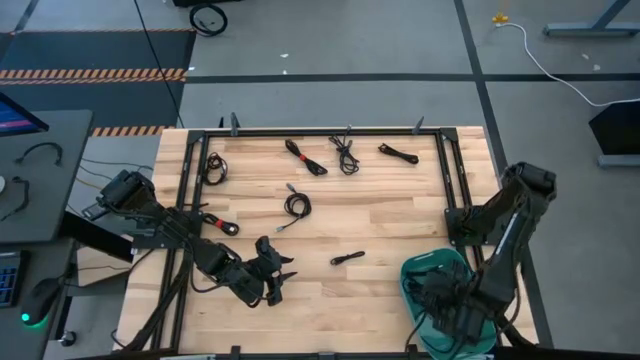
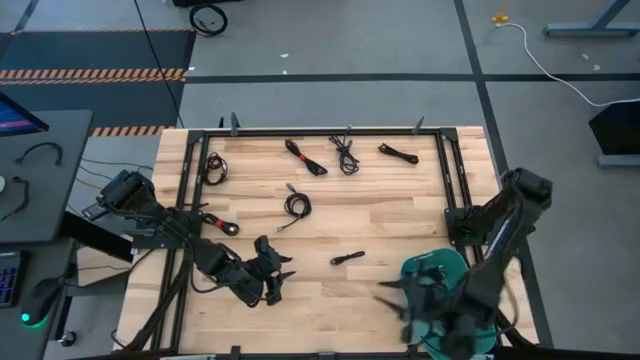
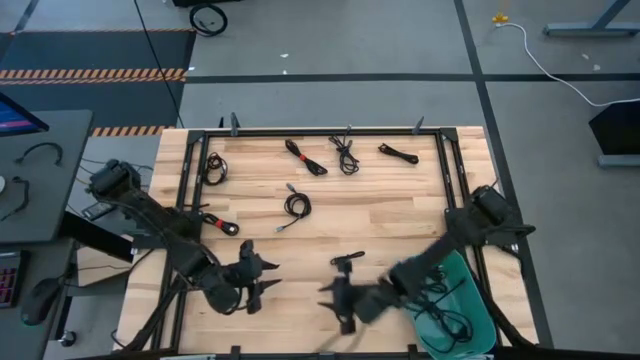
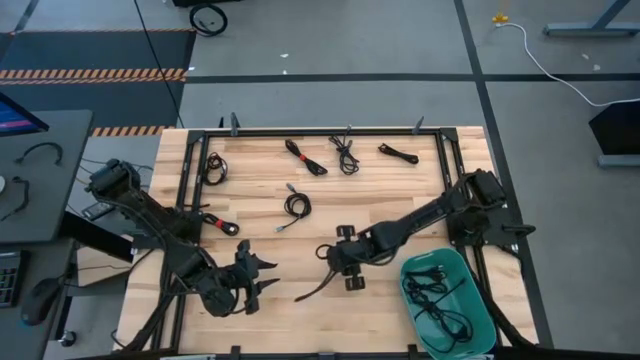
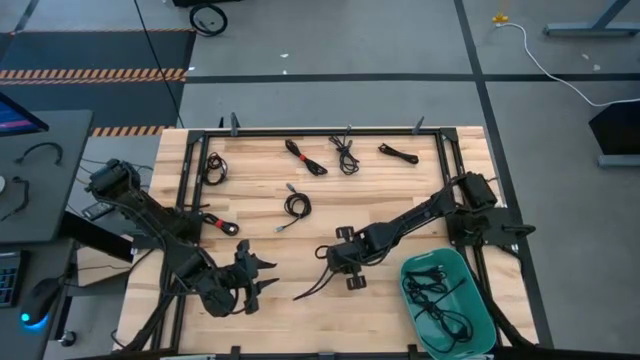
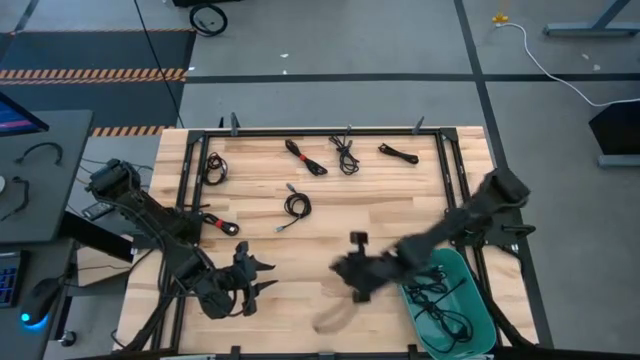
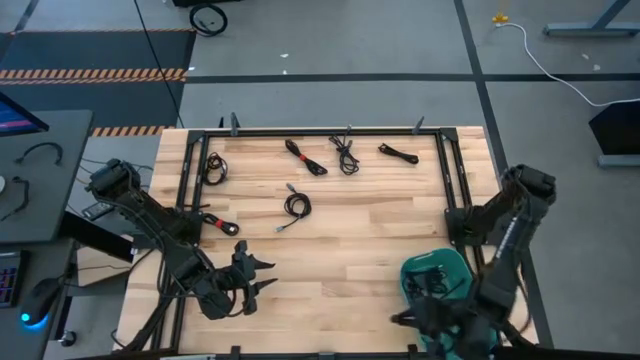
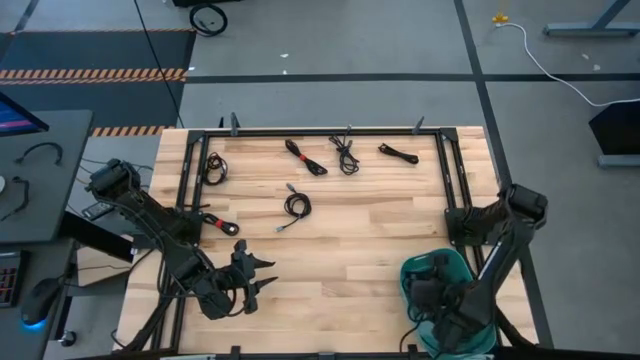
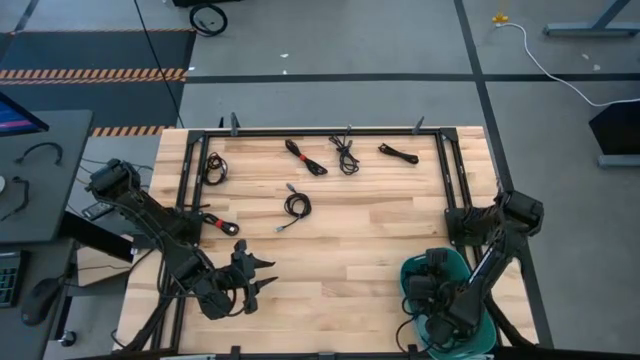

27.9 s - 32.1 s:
Task: Pick and place USB-C Cables
Put the black charger cable into the blue bin

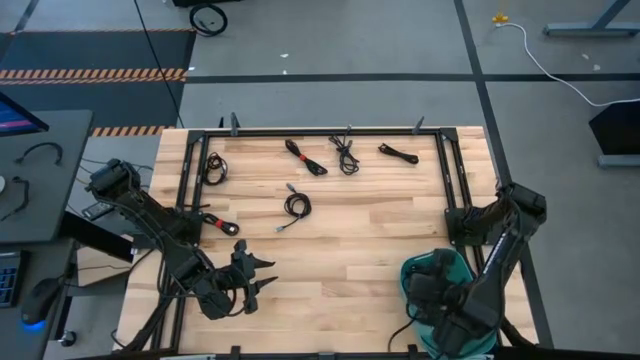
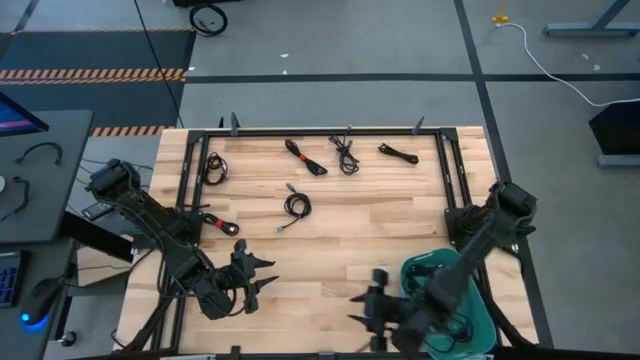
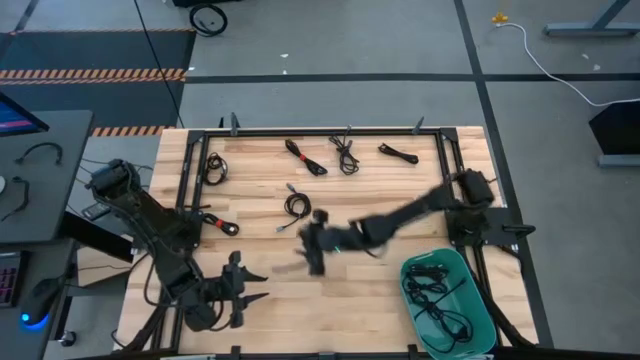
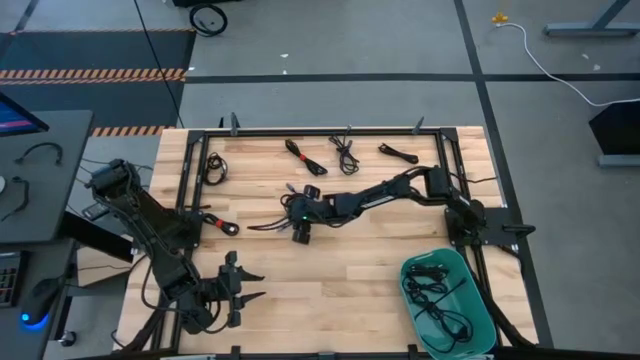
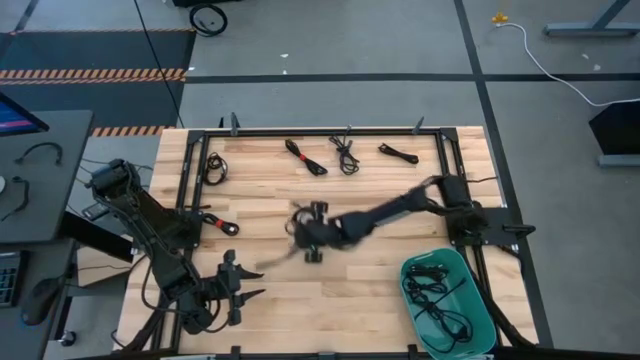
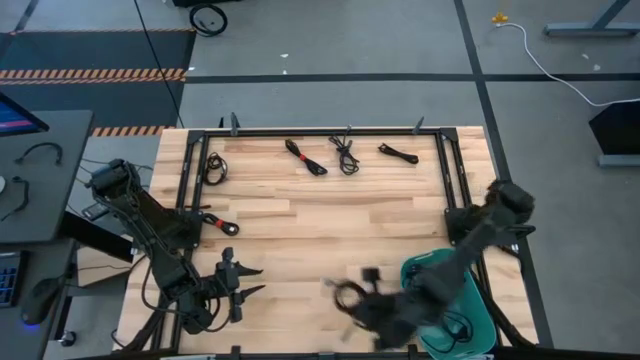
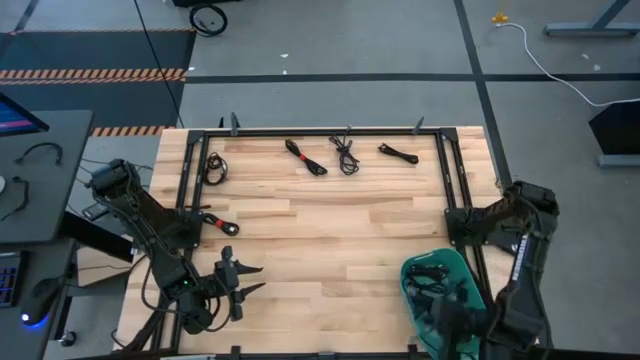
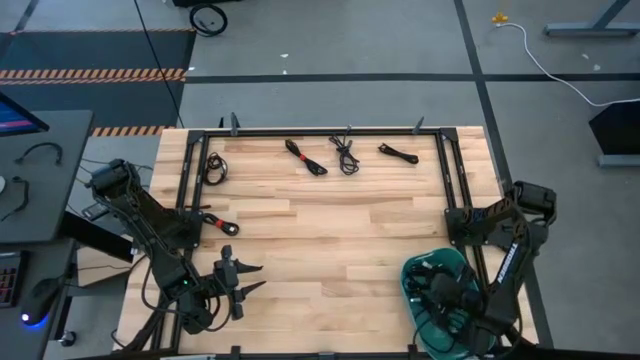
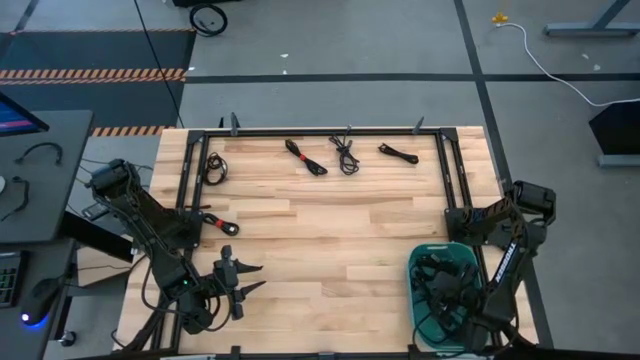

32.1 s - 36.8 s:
Put the black charger cable into the blue bin

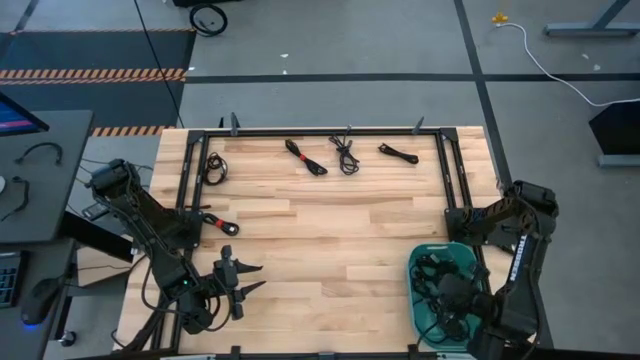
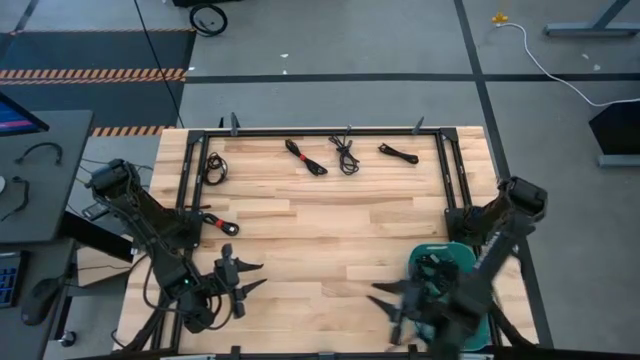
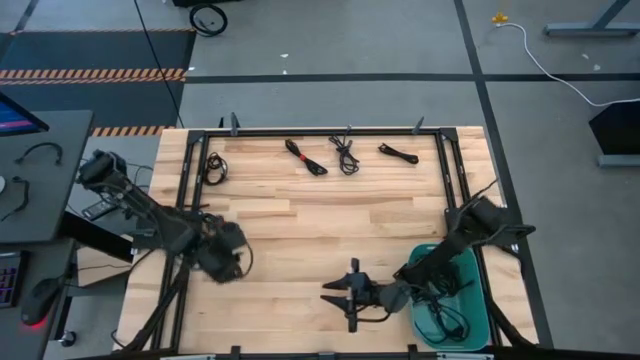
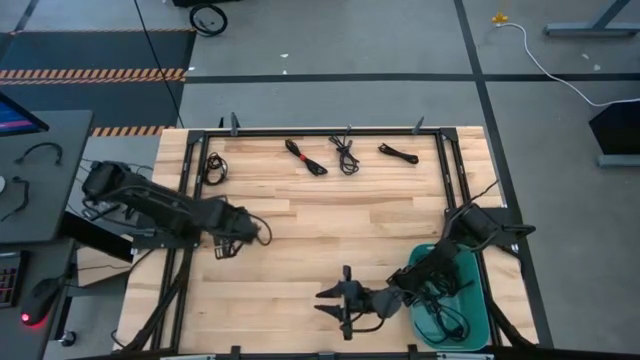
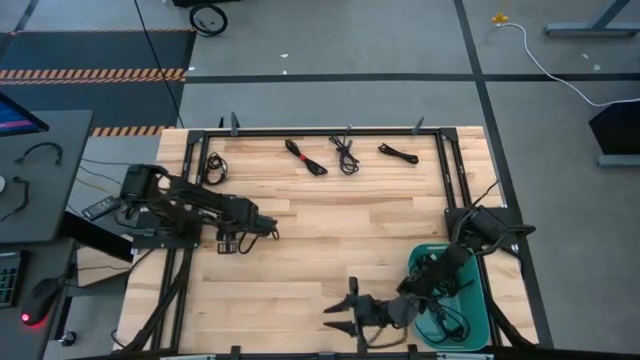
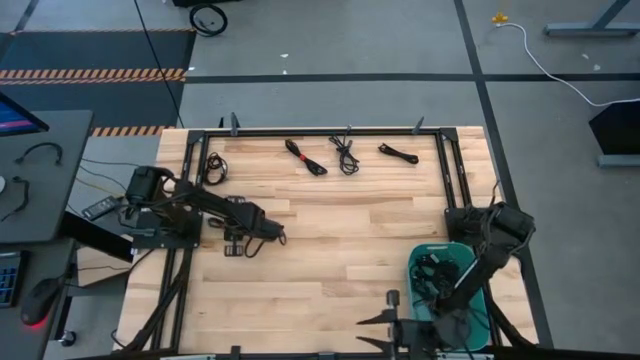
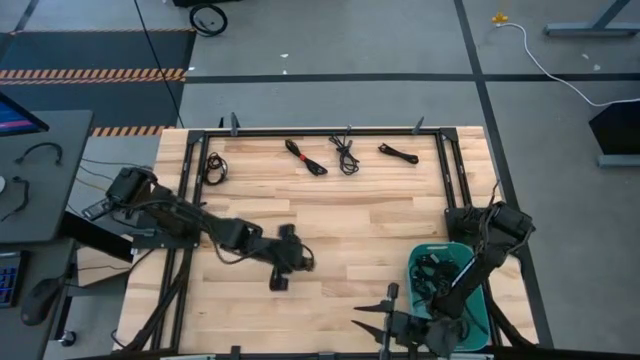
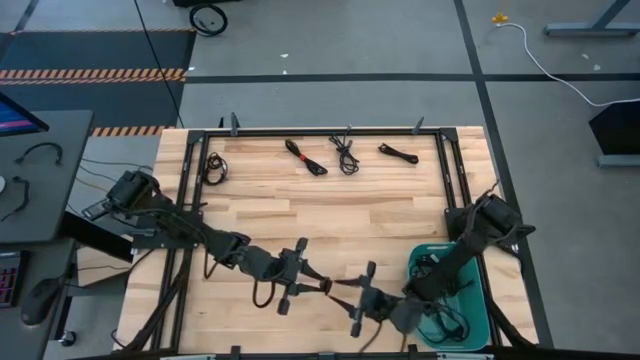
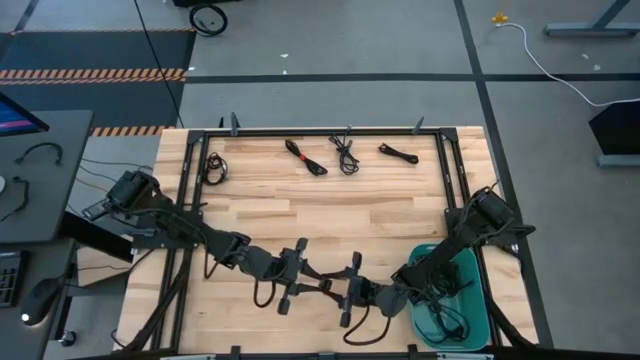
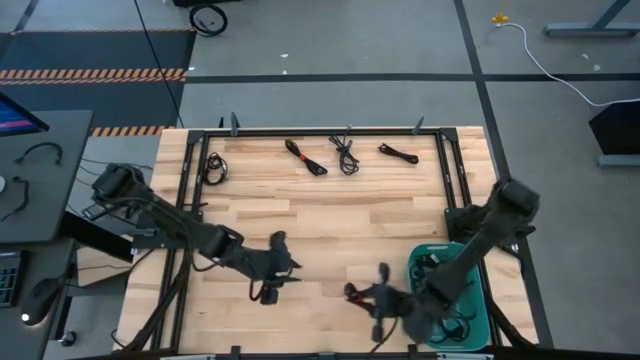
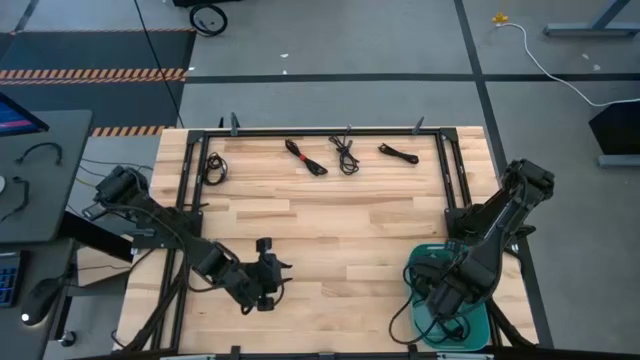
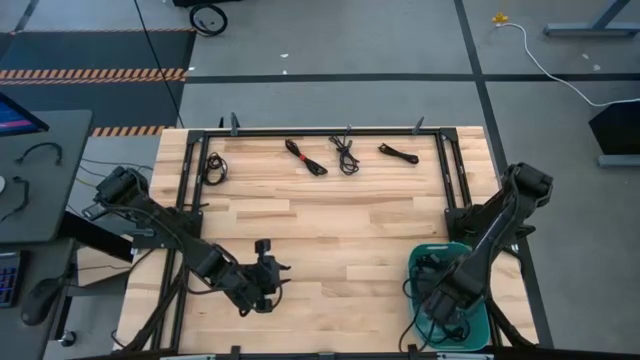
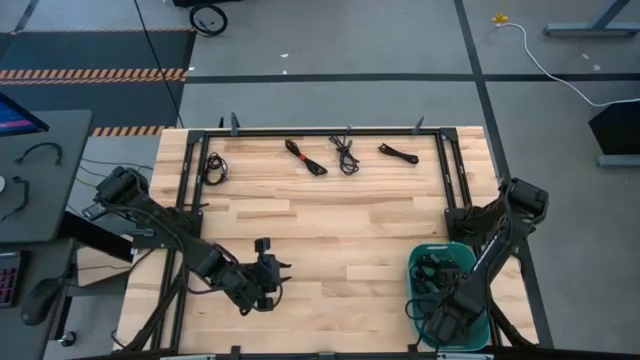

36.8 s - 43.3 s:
Put the black charger cable into the blue bin

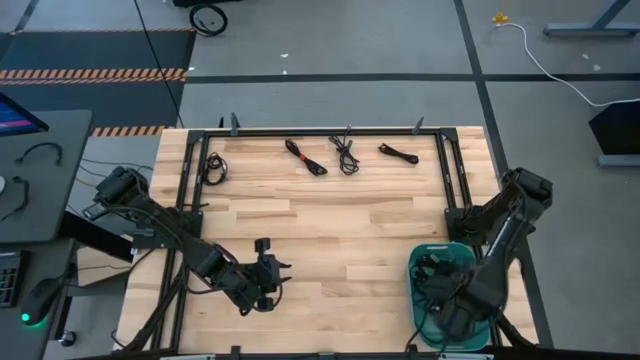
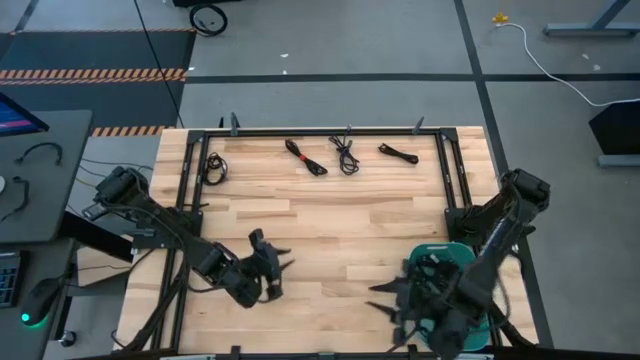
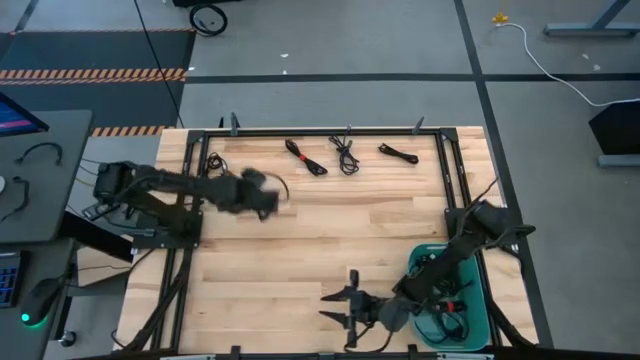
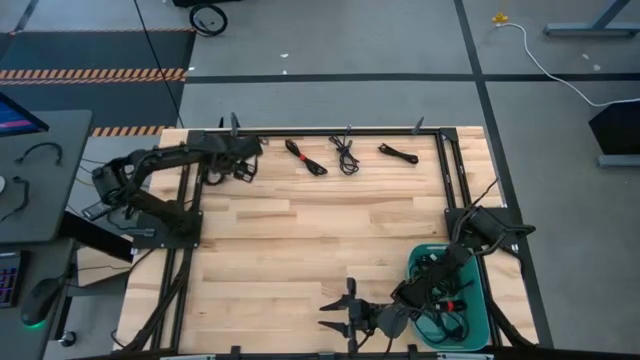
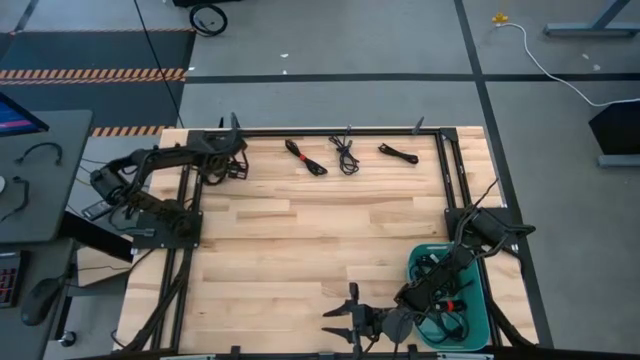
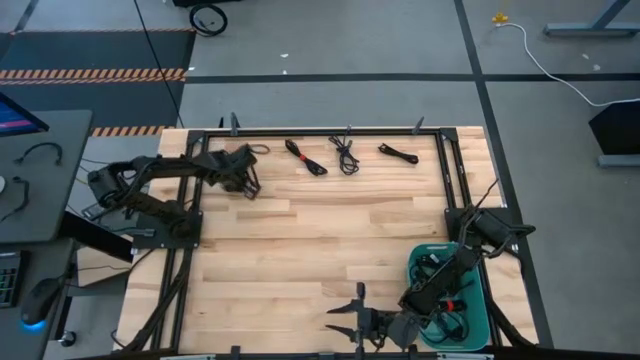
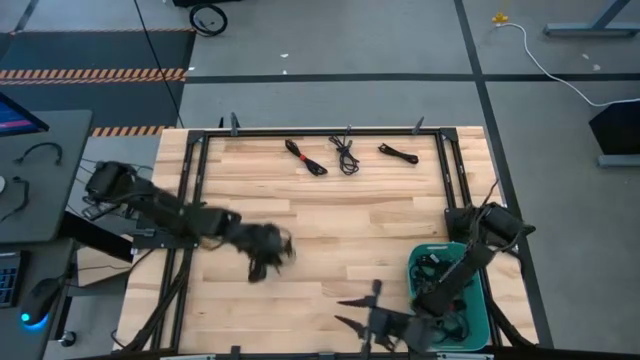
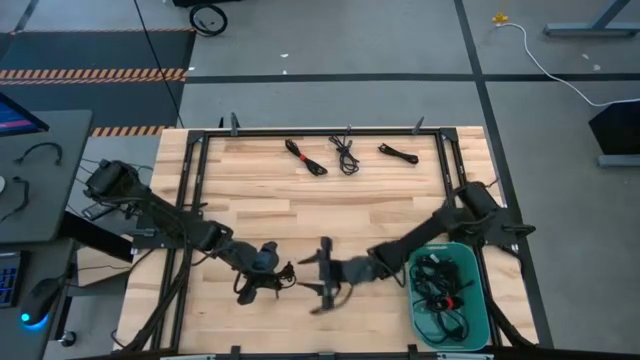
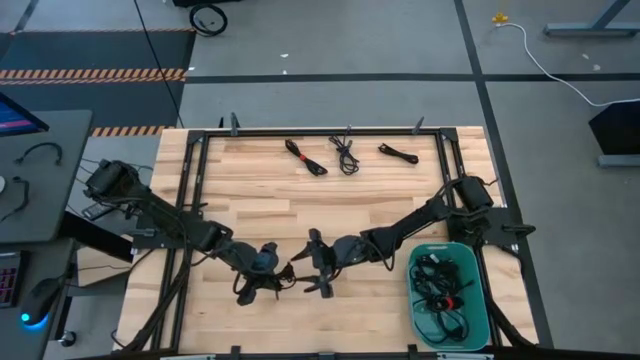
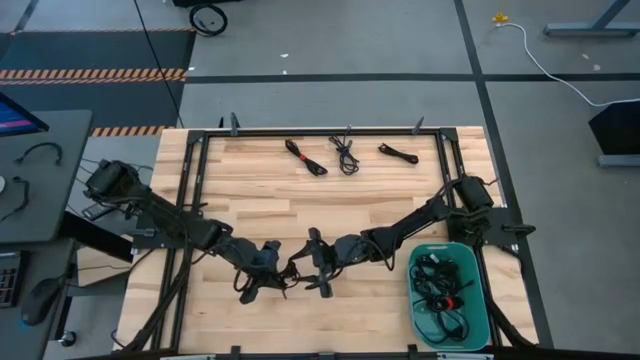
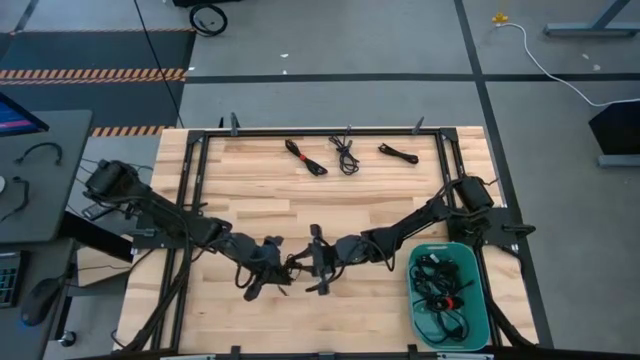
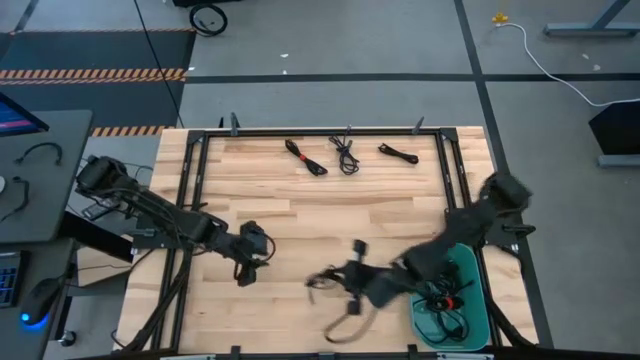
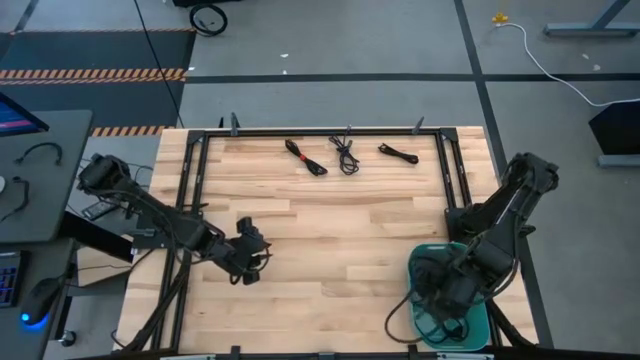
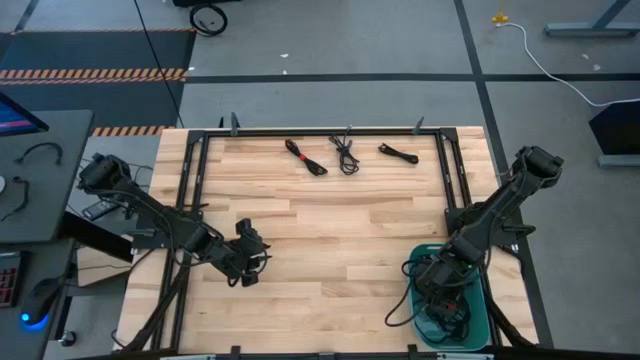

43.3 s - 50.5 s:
Put the black charger cable into the blue bin
